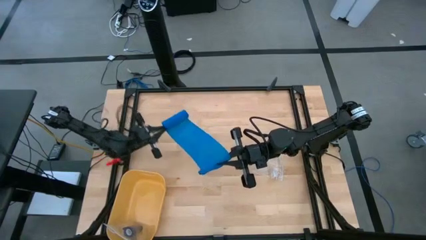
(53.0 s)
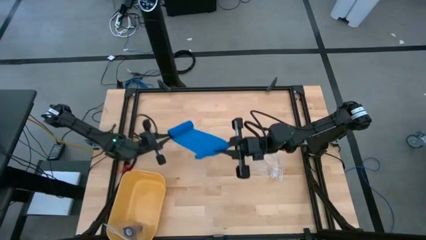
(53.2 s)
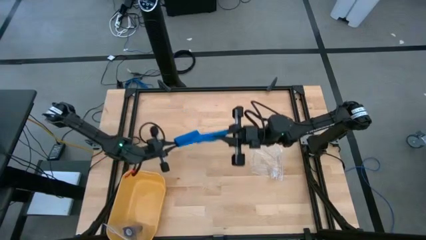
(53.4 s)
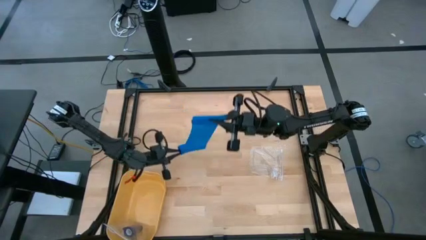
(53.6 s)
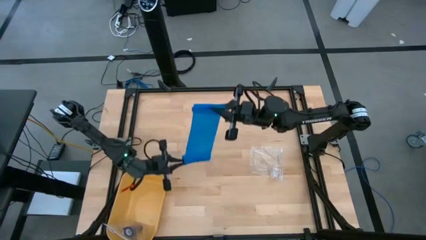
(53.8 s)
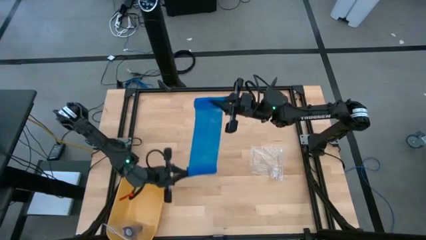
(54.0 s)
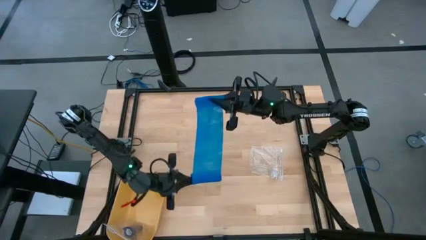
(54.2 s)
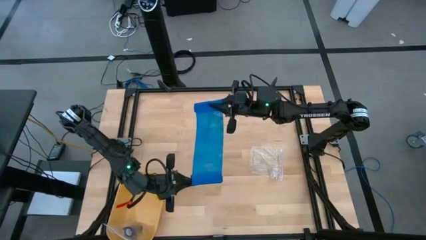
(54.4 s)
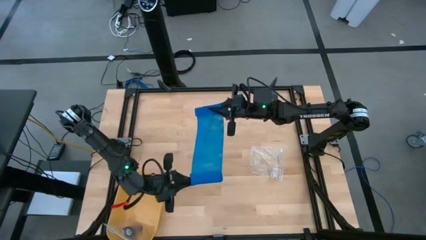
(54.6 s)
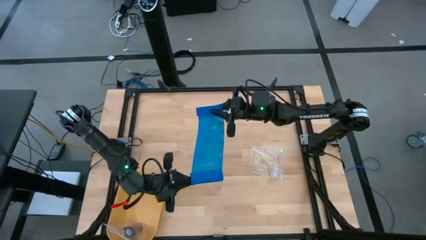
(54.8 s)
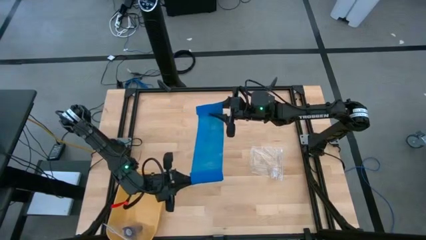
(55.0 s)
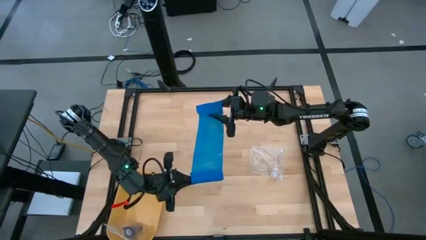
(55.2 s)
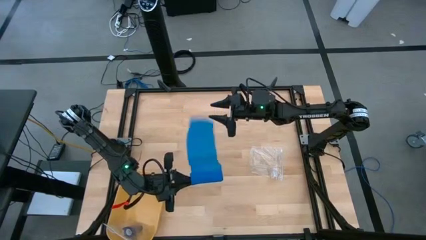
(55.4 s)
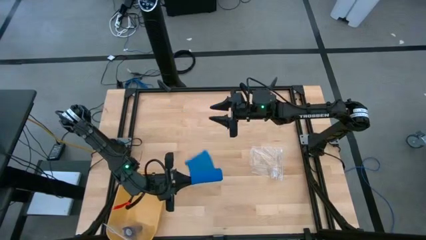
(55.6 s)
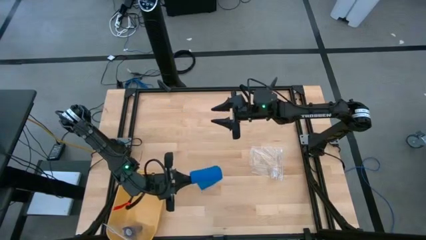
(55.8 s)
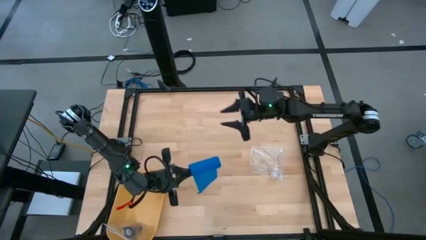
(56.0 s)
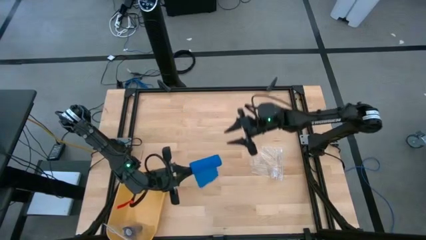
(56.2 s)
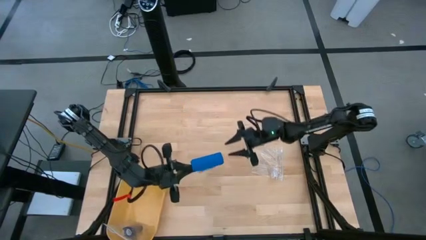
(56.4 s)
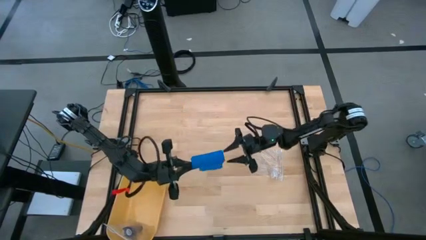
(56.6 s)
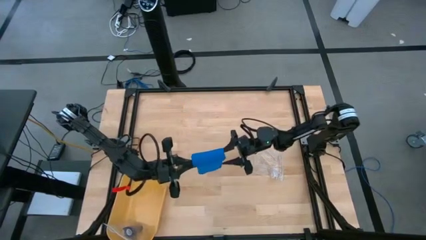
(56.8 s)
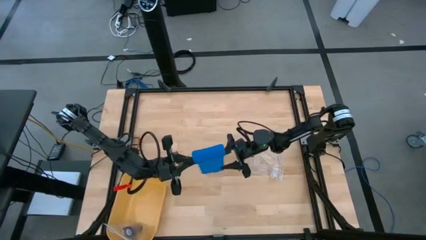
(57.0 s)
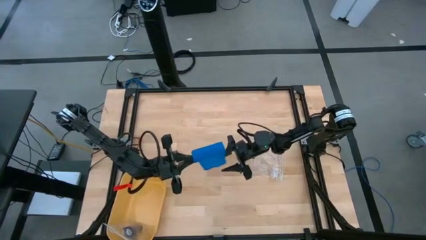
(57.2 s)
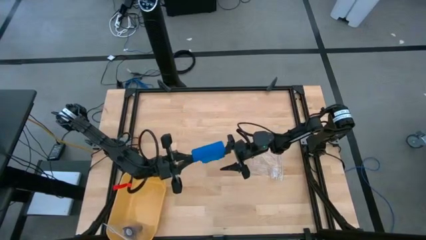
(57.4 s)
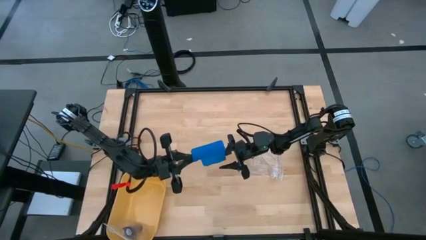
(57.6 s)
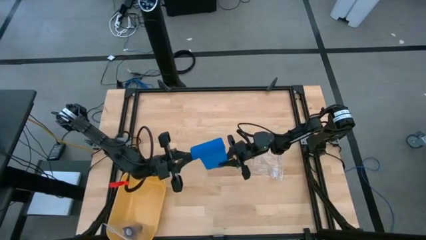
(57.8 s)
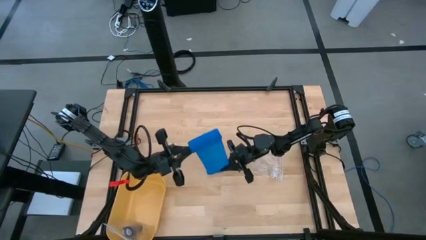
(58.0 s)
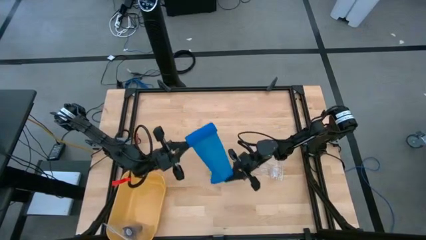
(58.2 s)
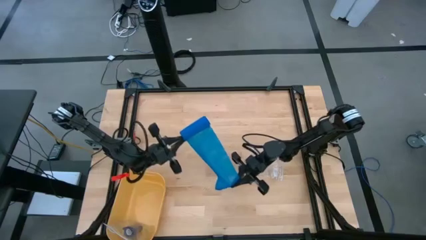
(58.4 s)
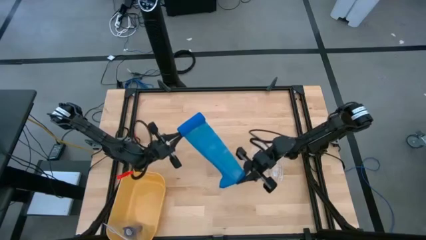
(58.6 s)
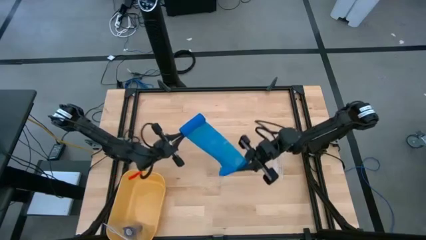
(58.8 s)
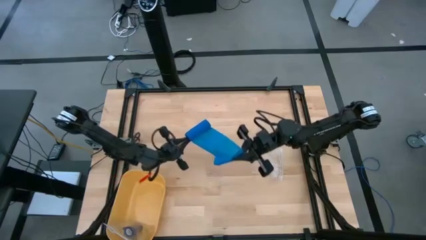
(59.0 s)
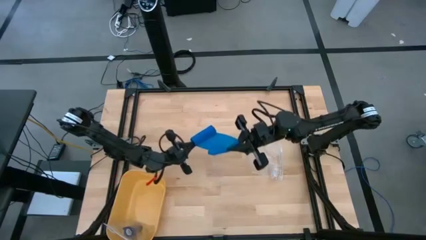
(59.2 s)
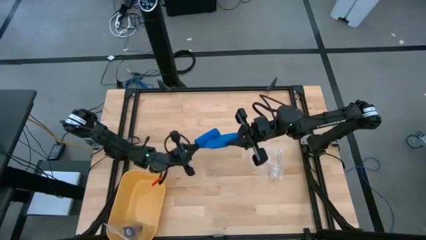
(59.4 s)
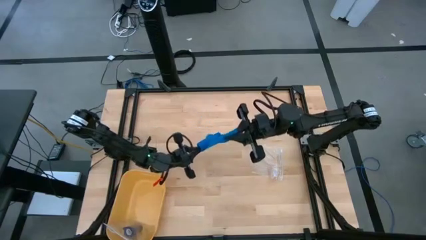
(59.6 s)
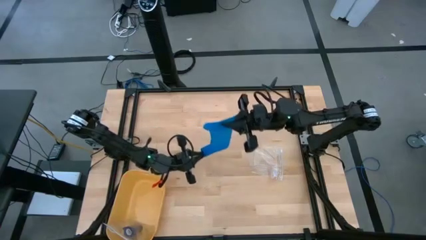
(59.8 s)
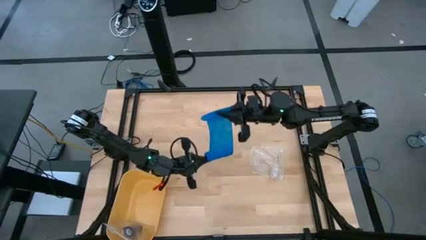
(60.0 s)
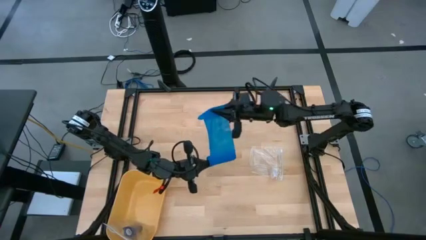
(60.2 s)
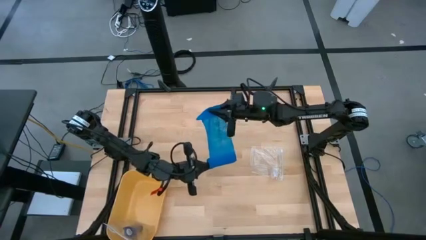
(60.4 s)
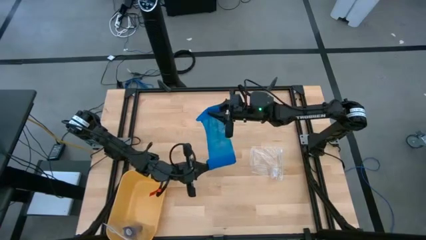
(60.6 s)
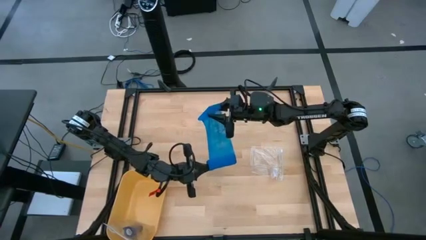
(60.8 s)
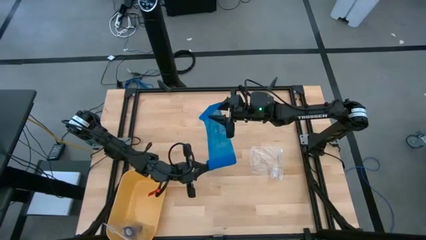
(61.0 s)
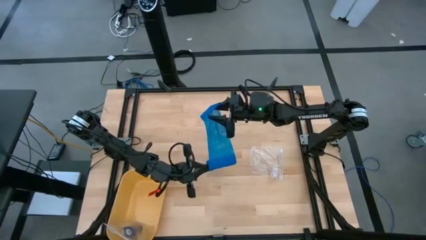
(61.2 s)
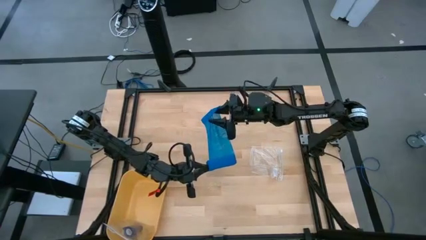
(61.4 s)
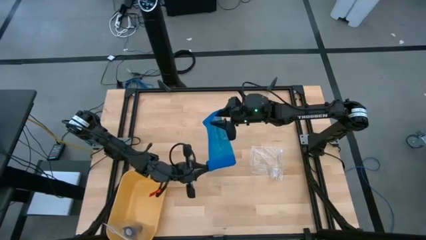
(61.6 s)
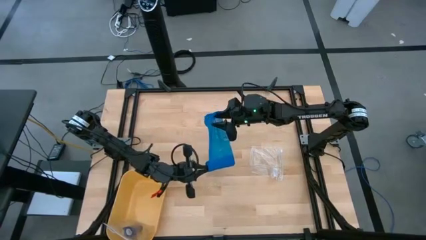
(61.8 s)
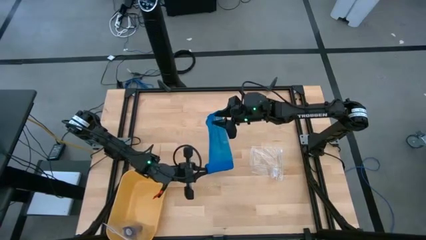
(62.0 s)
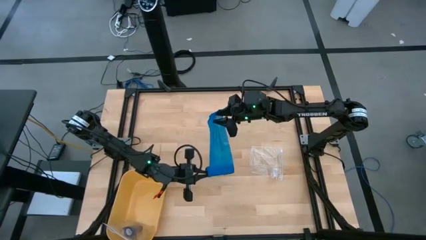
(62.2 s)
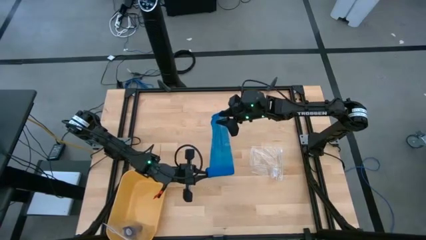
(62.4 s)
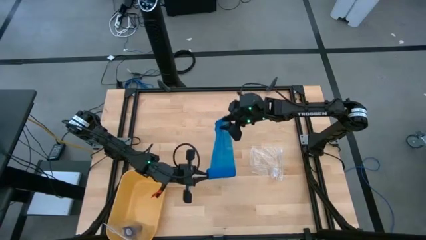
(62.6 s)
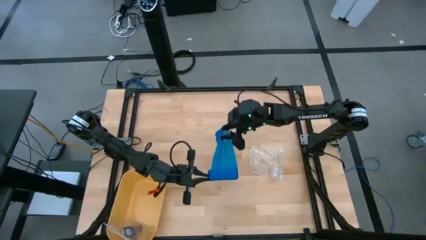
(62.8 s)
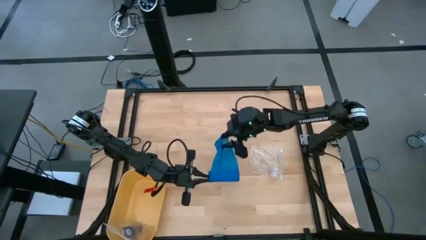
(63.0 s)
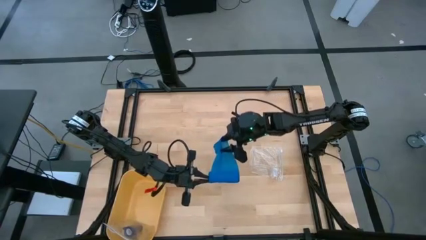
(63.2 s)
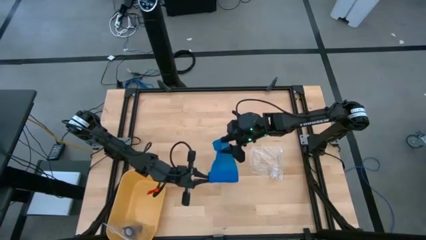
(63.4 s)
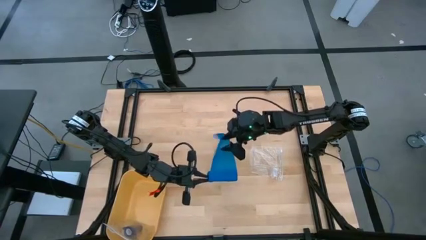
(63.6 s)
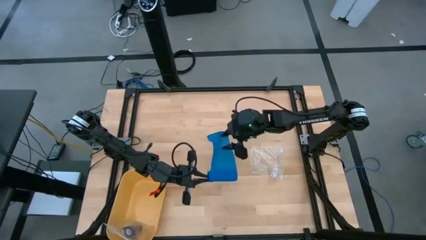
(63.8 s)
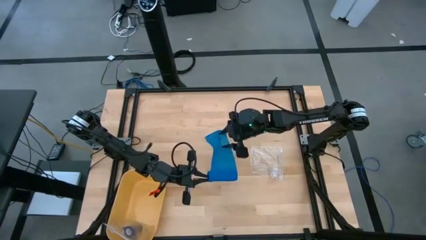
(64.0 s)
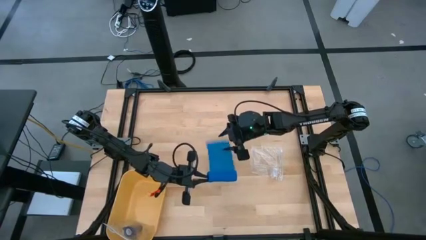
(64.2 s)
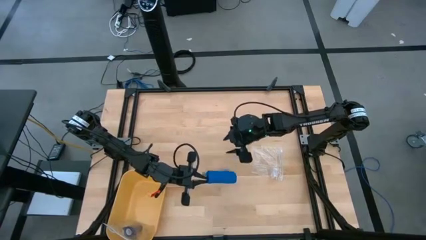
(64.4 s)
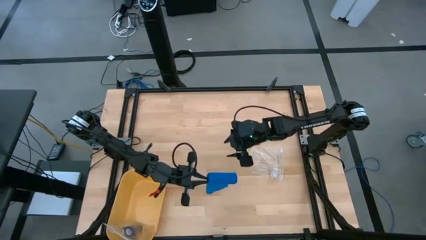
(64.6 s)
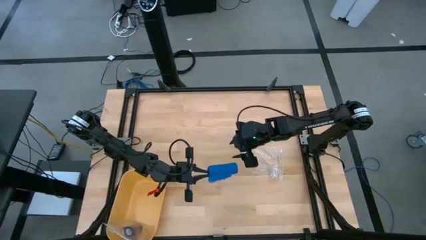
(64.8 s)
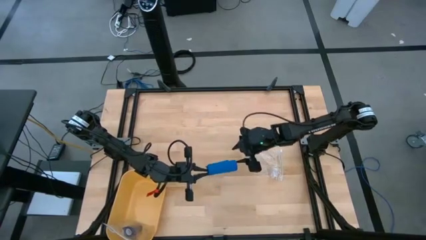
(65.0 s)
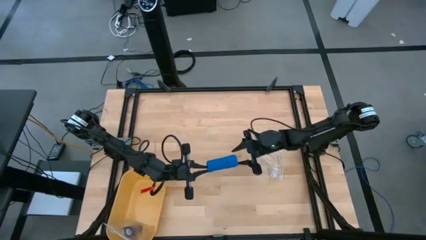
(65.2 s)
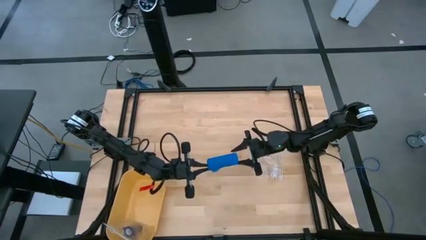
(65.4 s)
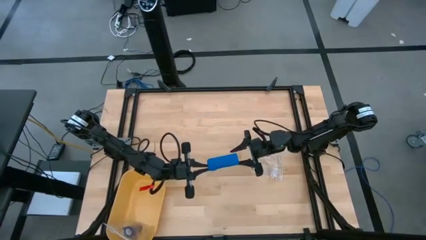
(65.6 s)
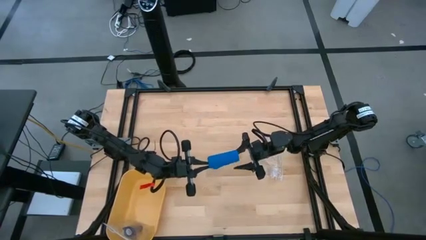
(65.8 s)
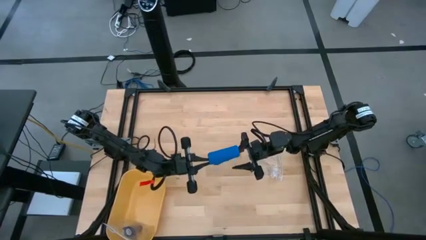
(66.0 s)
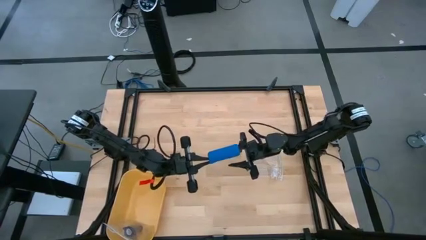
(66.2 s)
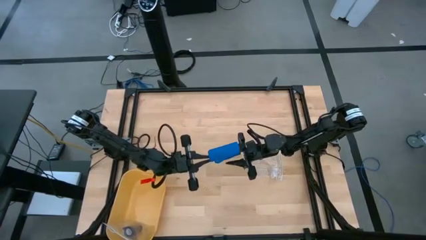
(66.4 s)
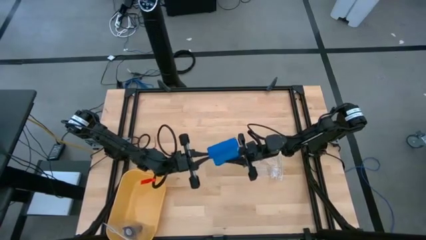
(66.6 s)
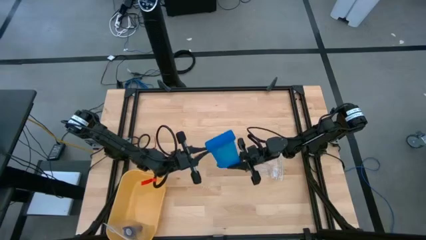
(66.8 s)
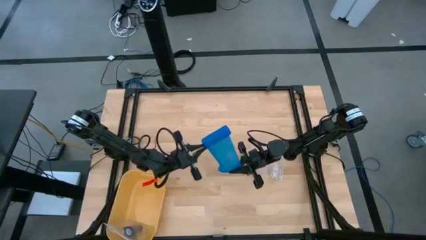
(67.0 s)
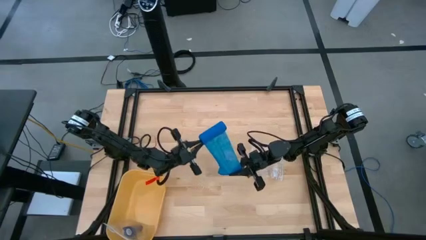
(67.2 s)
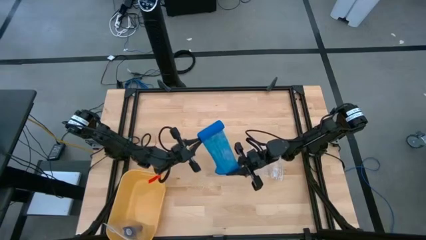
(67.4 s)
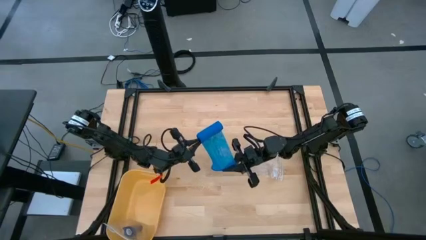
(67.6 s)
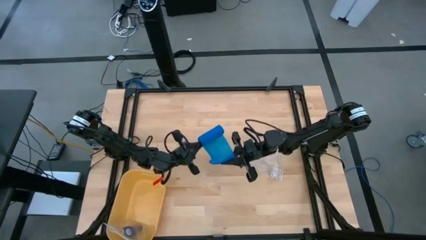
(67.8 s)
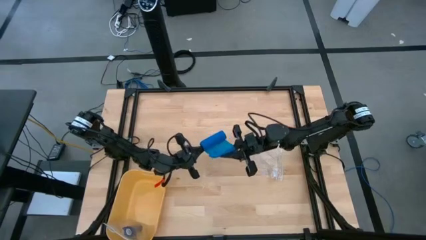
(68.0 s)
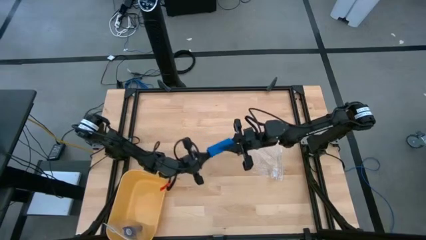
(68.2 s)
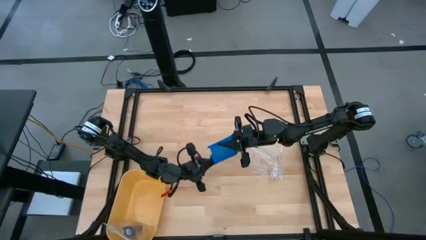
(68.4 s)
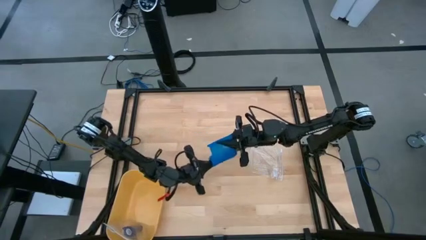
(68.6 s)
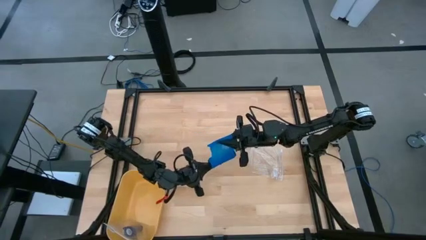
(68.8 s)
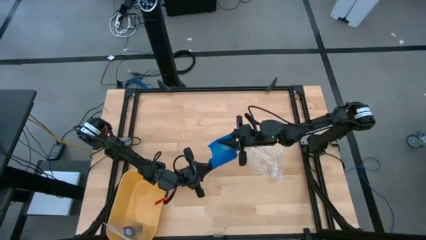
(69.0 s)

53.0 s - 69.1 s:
Task: Roll bandage
Roll the blue bandage
